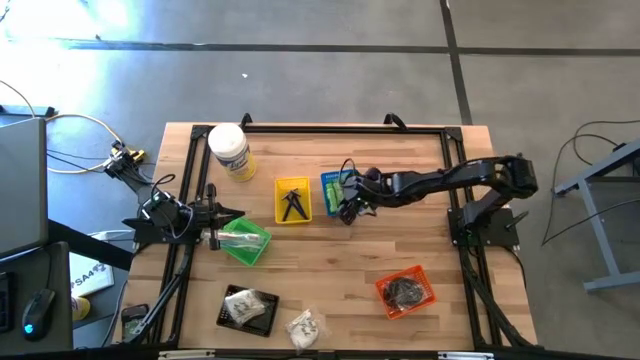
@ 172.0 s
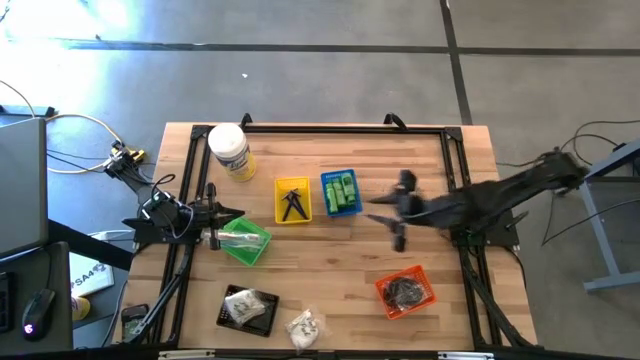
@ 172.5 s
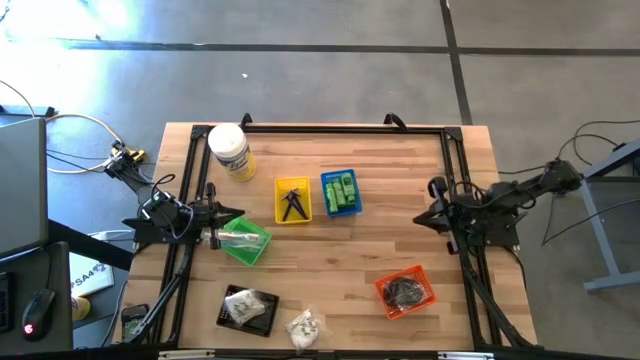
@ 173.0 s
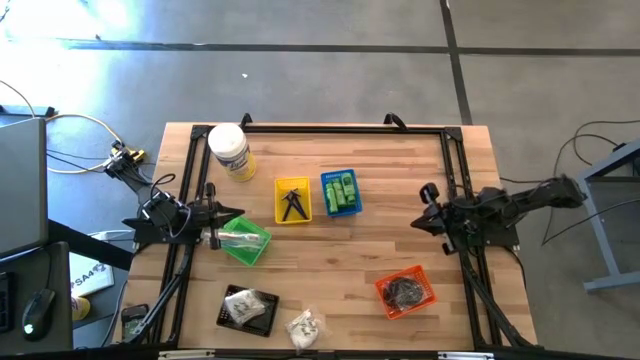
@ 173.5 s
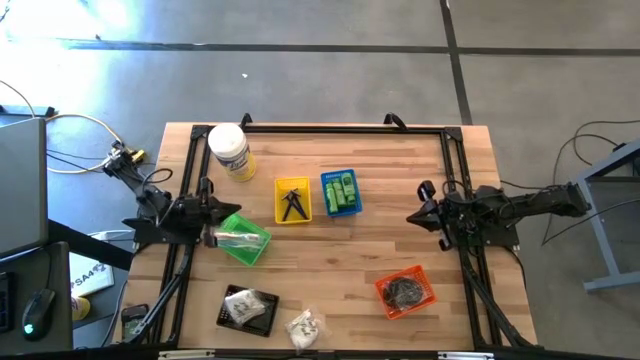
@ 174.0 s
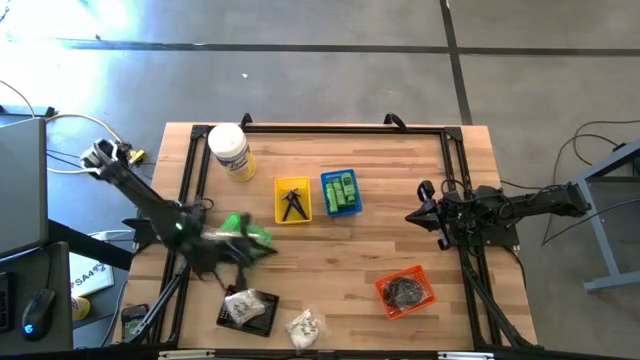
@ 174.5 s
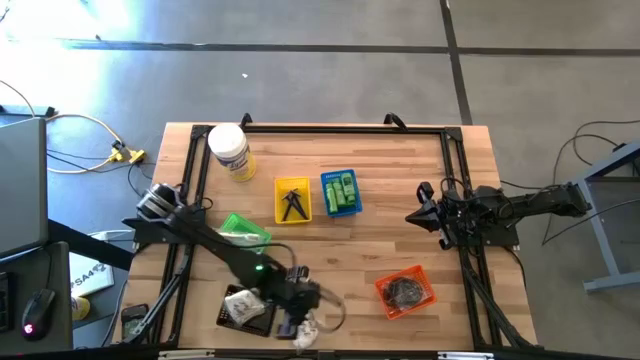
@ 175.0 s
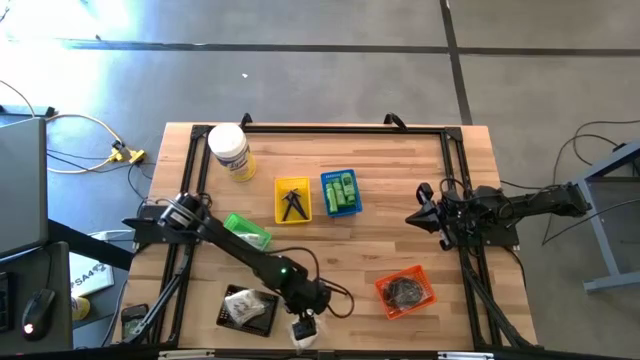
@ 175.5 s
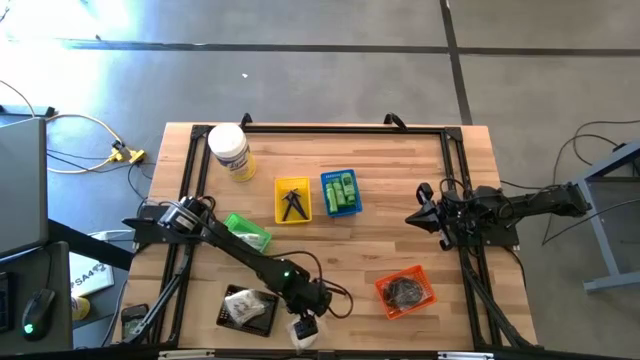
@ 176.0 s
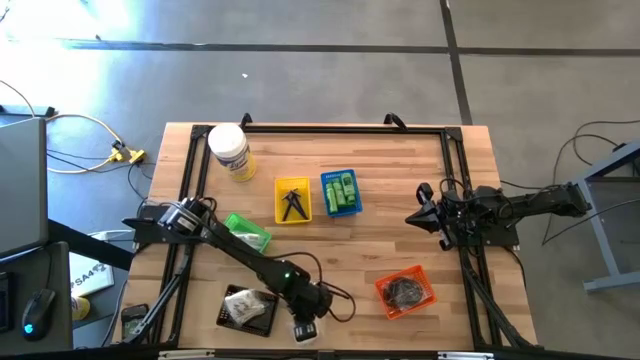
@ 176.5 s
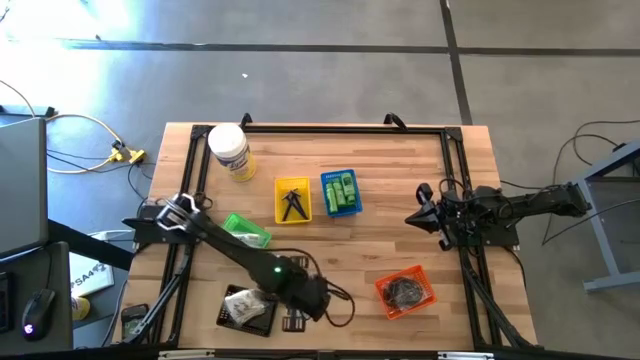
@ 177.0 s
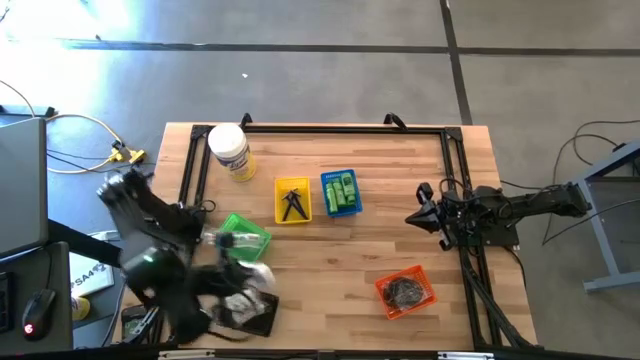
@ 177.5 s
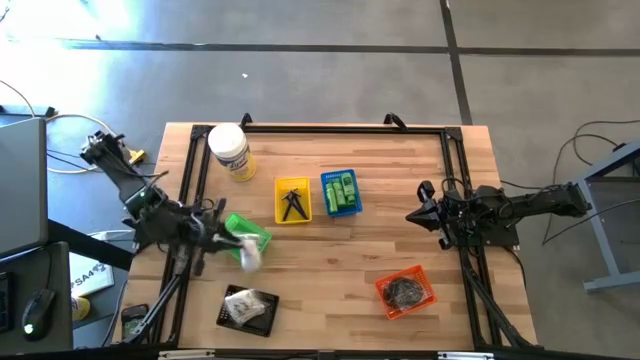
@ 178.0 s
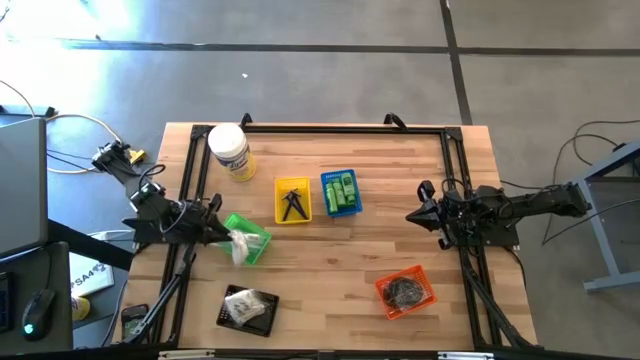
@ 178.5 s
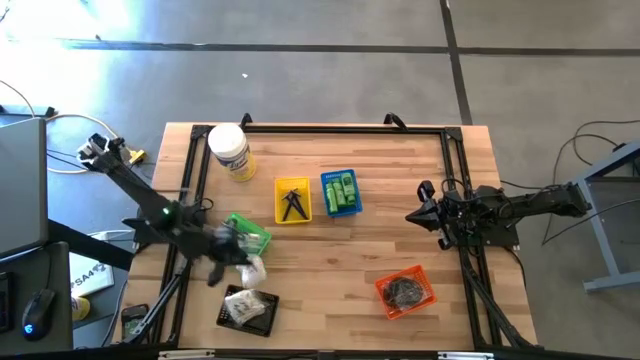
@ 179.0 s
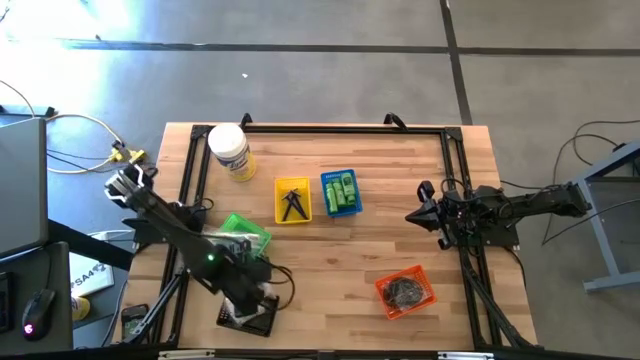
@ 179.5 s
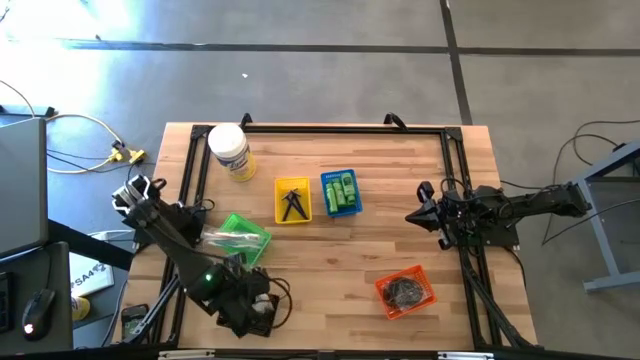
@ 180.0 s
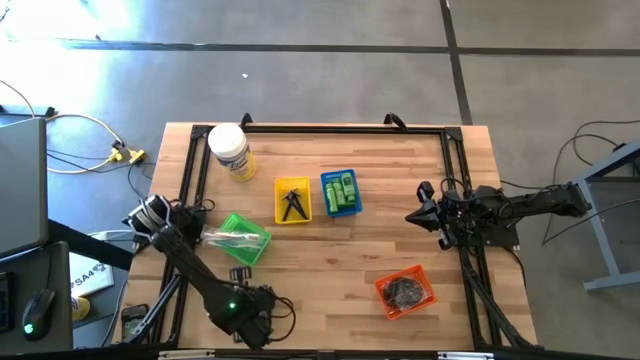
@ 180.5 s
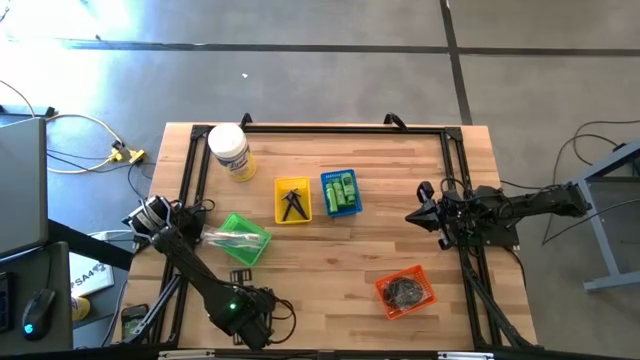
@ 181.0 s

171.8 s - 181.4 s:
Task: Pick & Place Travel size toiletries
Put the cotton pack into the black bin

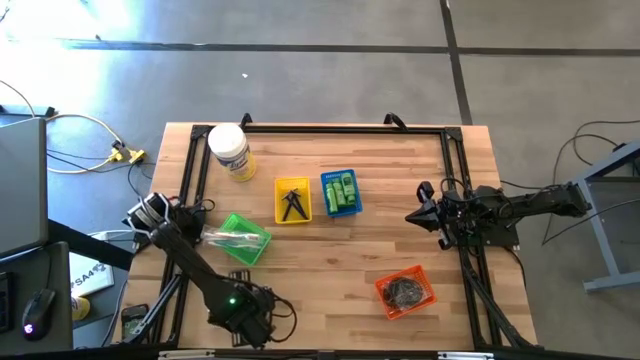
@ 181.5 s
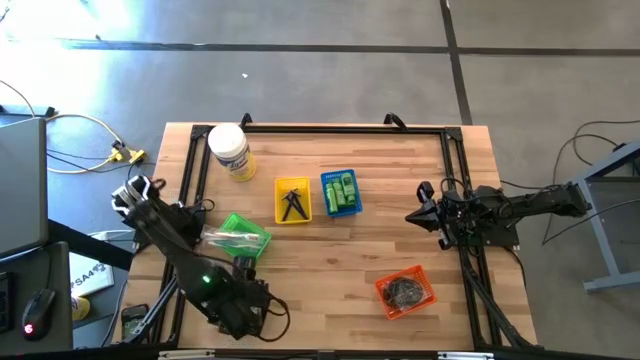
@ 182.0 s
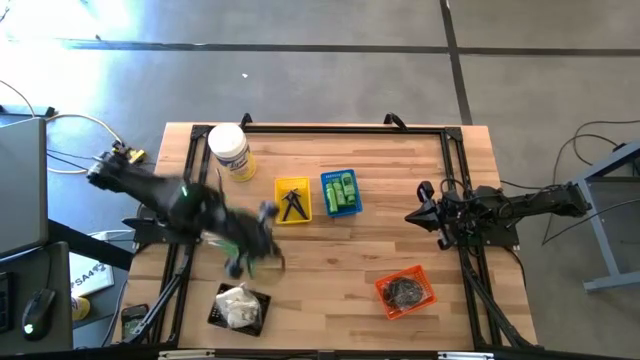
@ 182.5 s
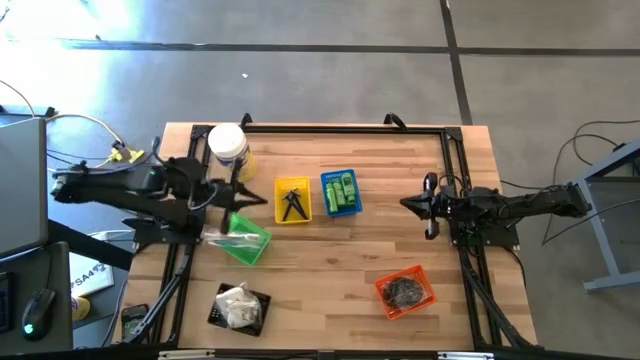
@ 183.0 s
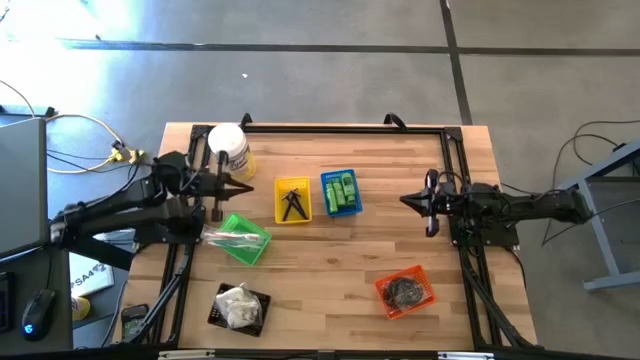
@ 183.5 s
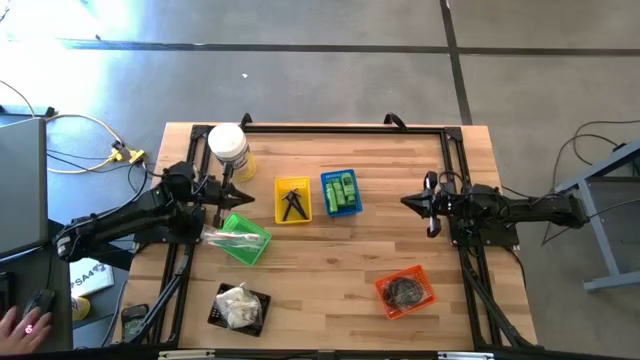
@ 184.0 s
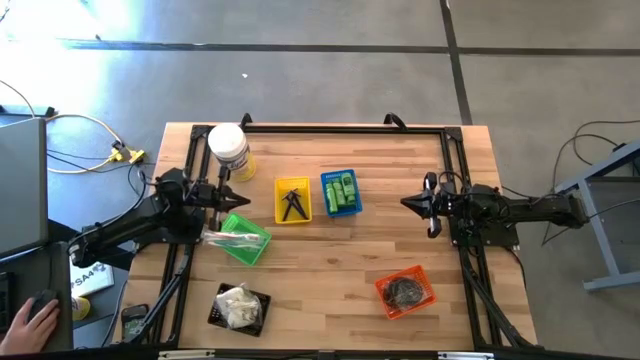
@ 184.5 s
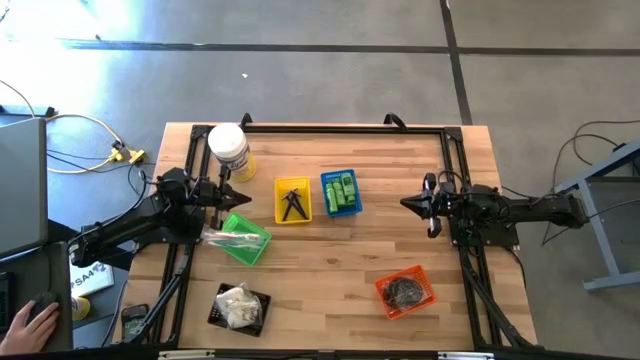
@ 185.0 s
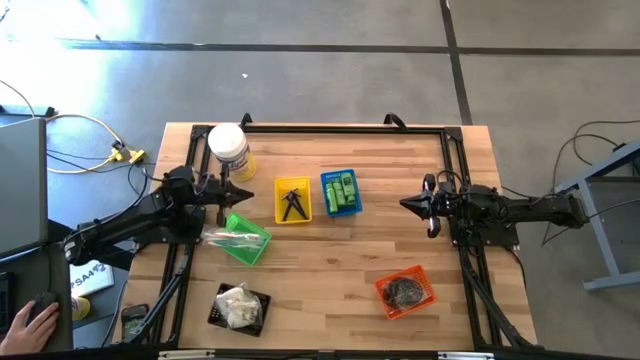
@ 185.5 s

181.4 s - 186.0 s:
Return to Home Position

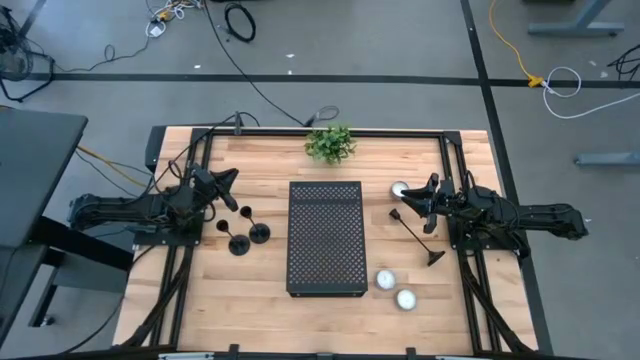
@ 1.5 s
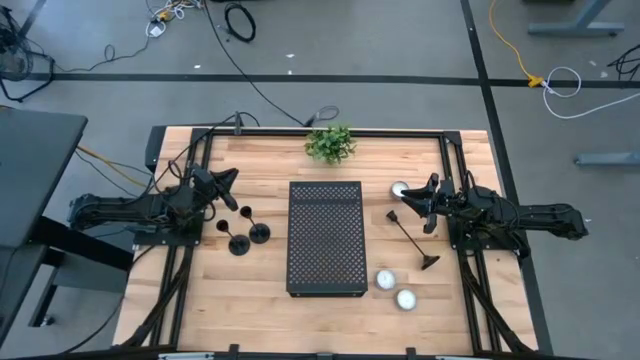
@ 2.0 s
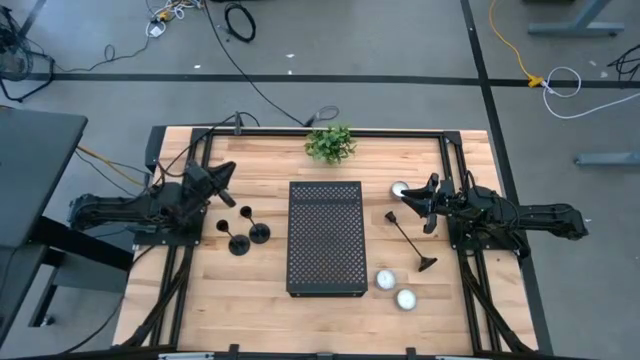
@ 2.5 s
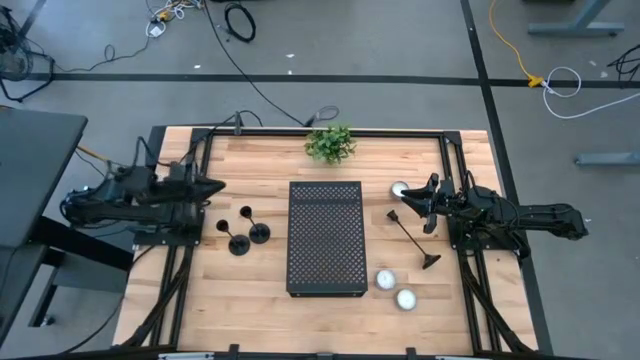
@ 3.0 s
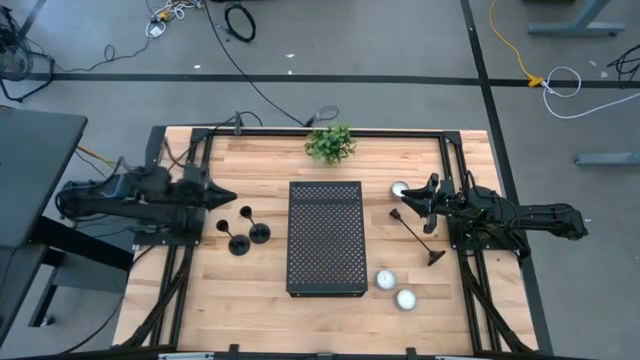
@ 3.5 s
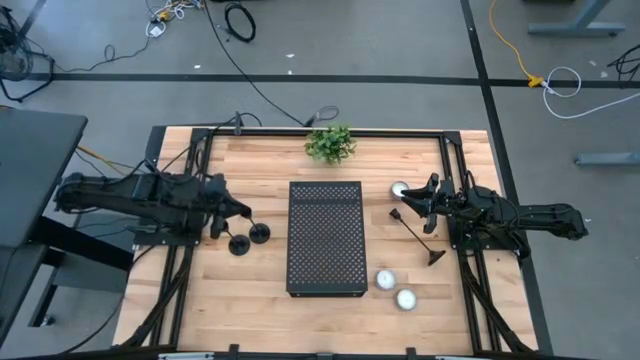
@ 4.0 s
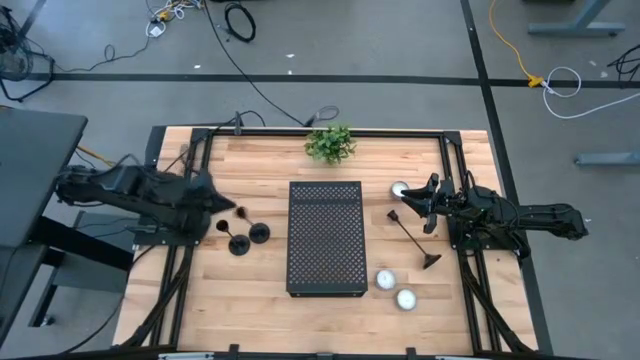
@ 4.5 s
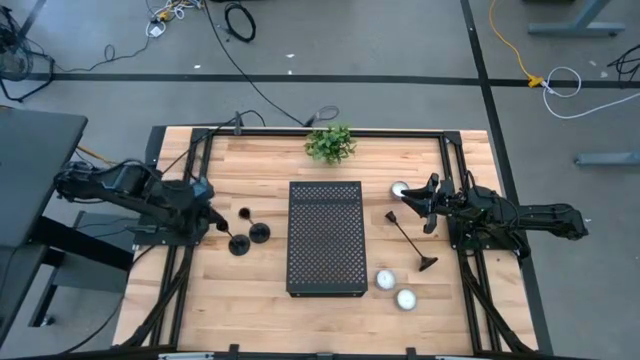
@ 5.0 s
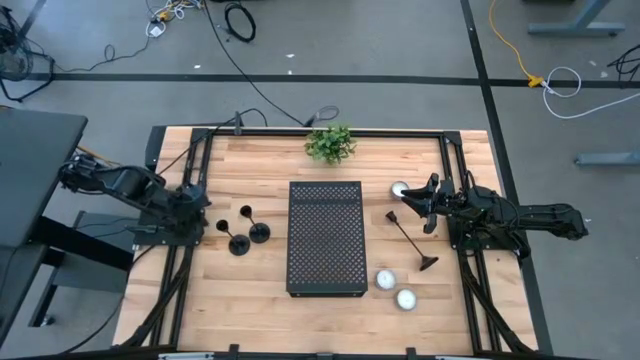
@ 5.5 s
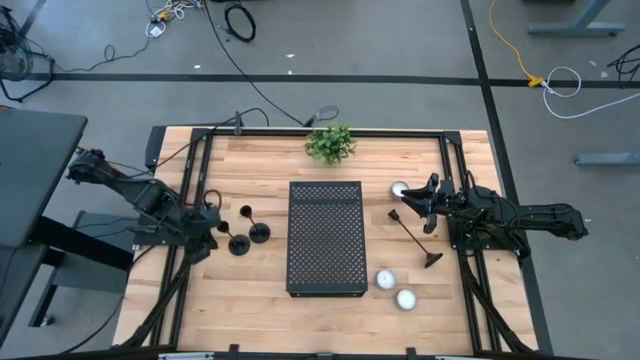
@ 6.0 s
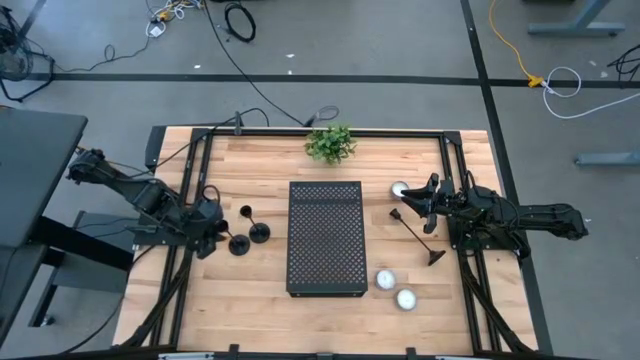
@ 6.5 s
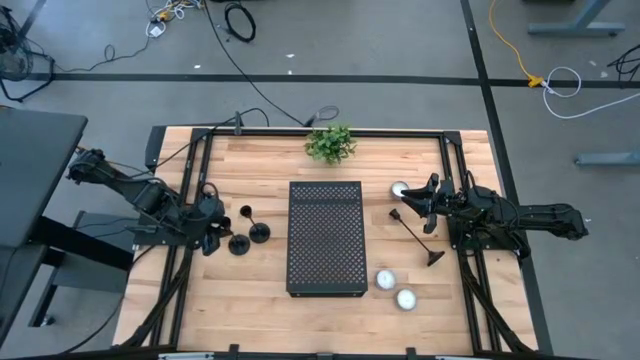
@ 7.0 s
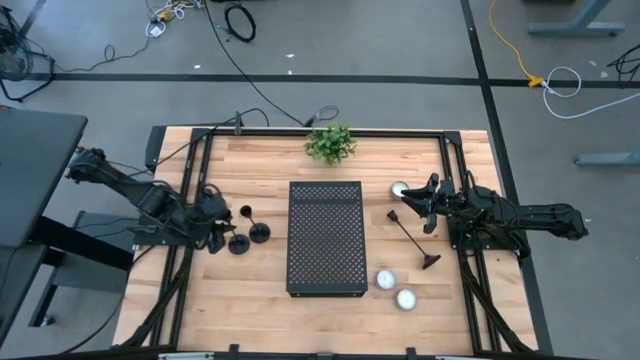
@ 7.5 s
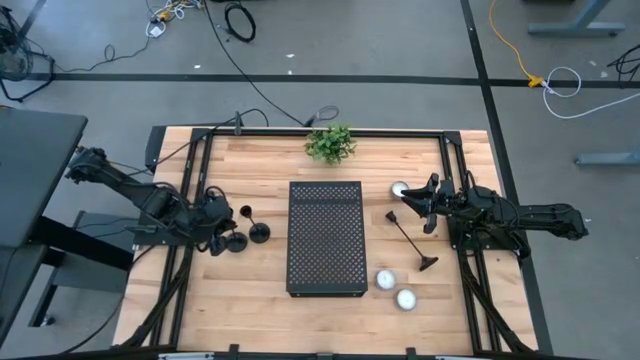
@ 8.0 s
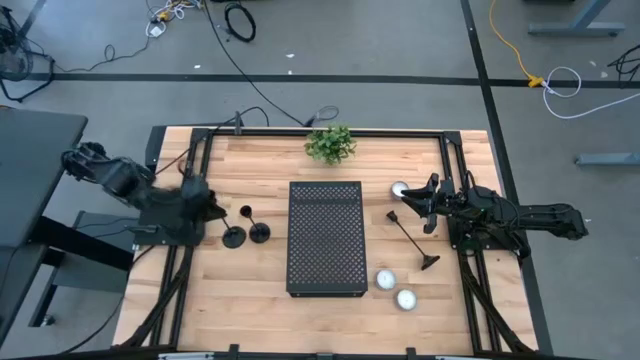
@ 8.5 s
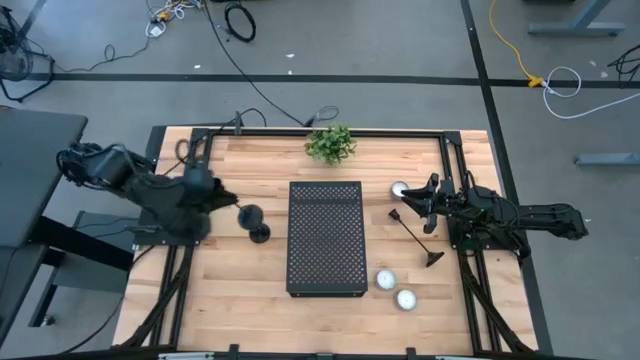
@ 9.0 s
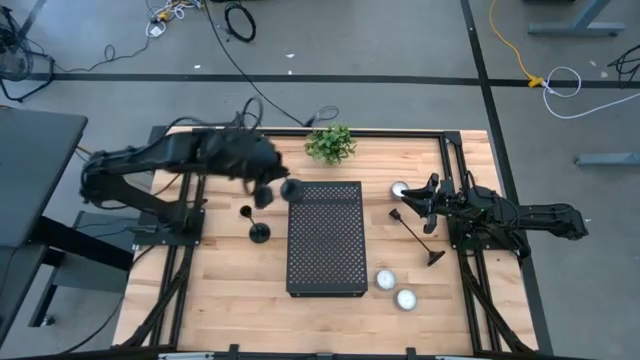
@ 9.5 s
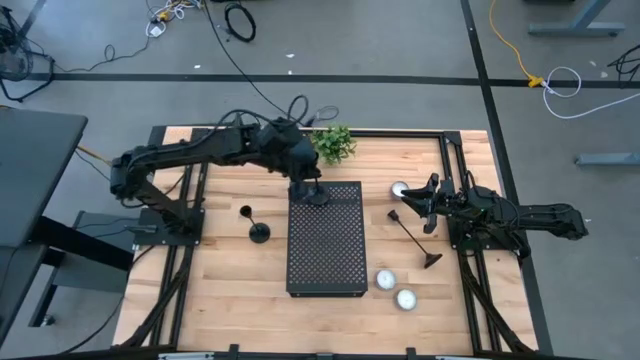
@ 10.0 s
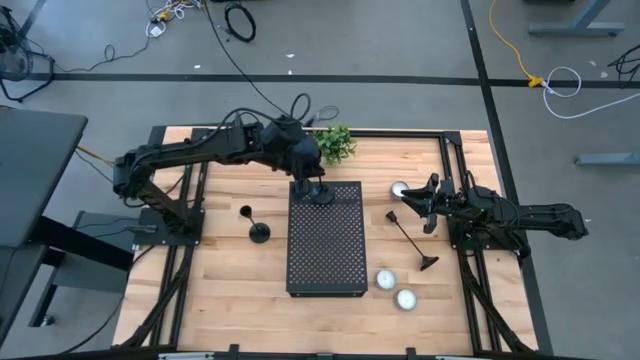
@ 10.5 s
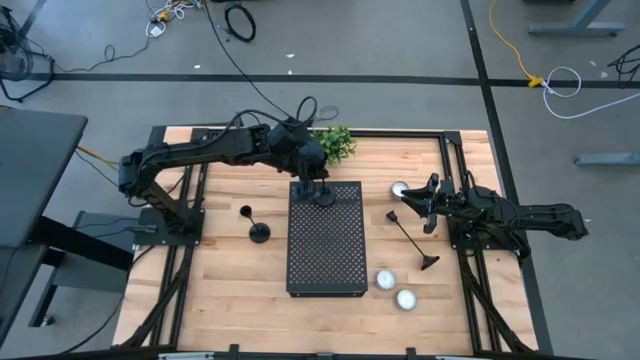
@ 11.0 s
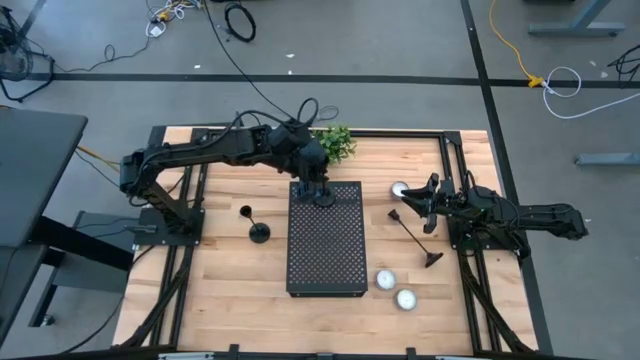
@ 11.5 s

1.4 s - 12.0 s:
Task: Pick & Place candle stick holders
Put the left black candle holder on the shelf
